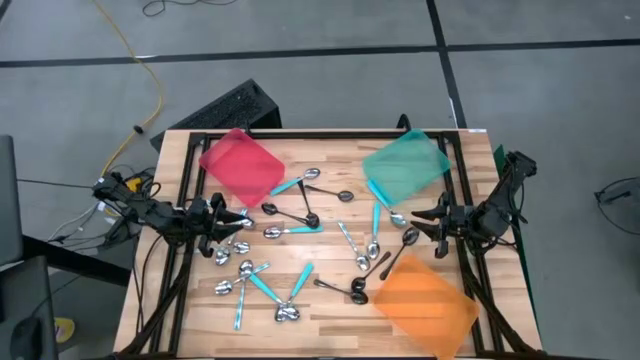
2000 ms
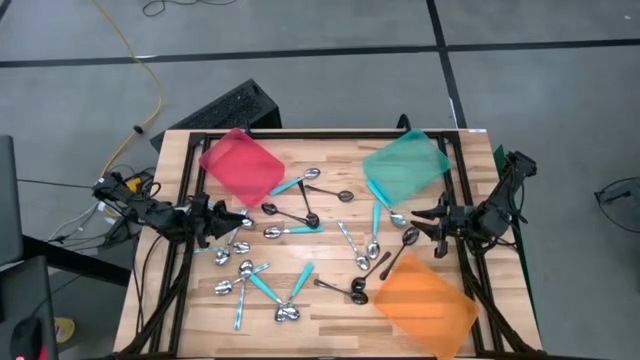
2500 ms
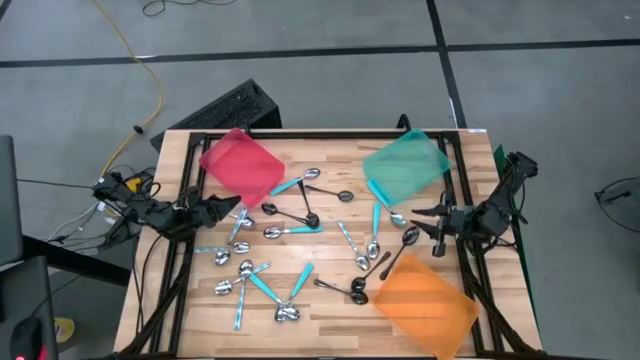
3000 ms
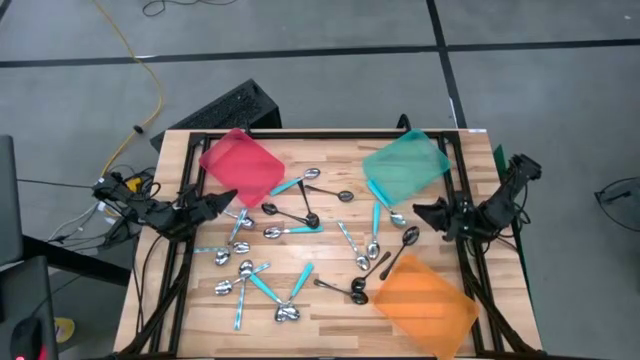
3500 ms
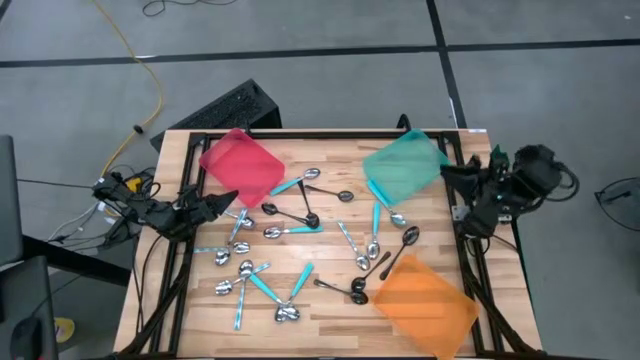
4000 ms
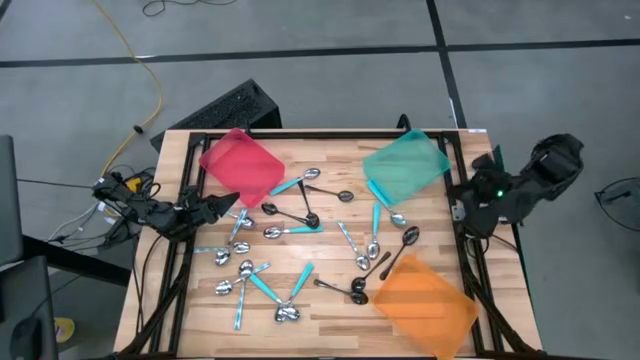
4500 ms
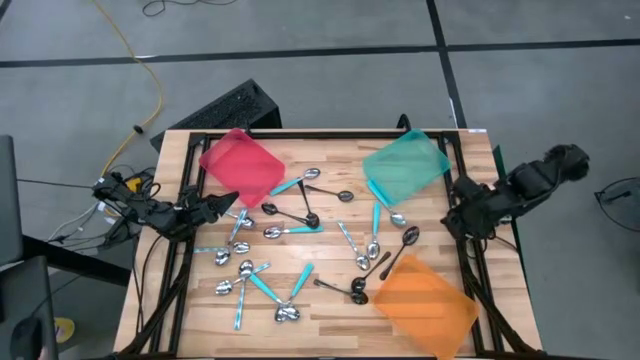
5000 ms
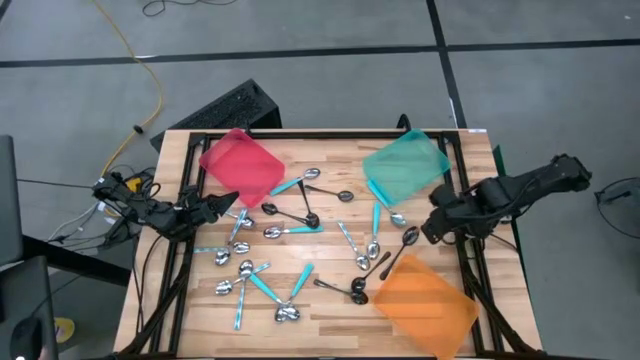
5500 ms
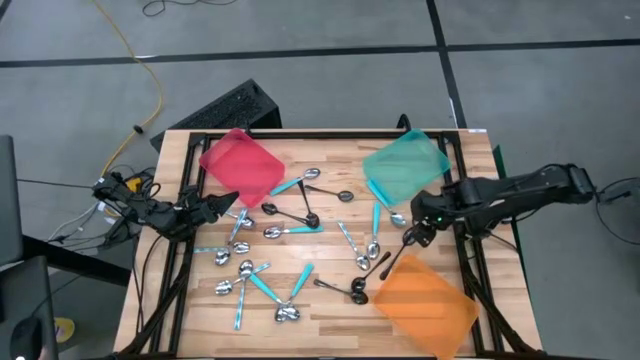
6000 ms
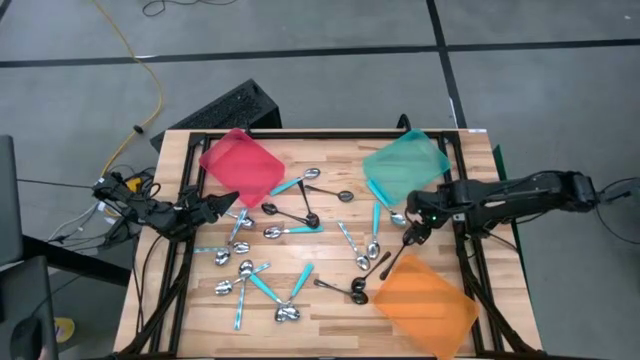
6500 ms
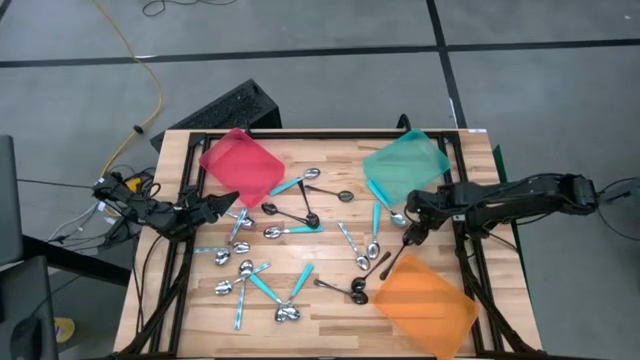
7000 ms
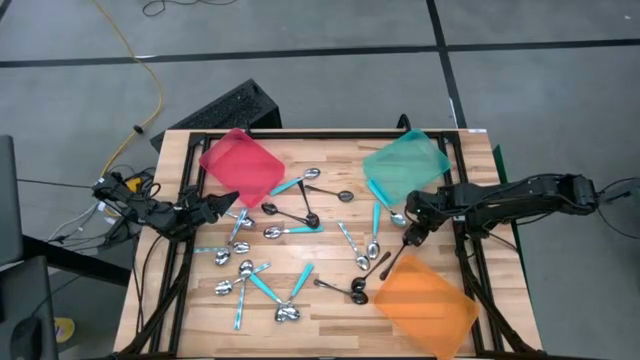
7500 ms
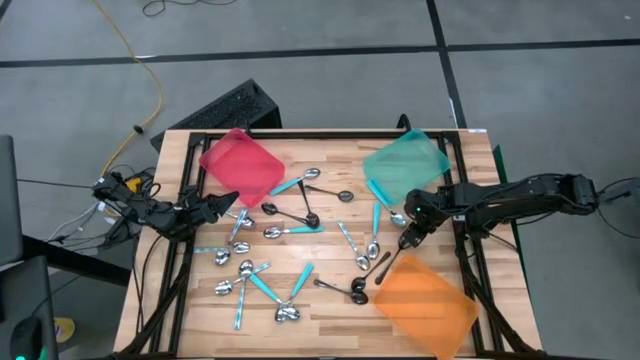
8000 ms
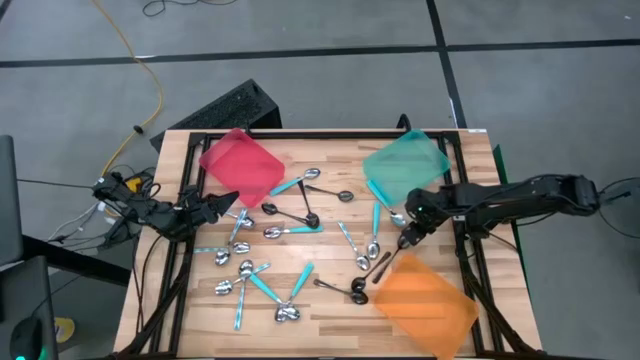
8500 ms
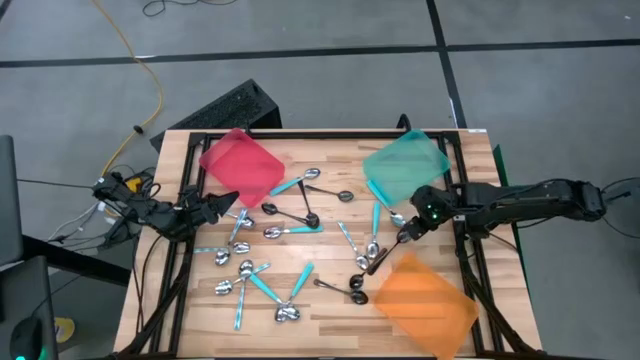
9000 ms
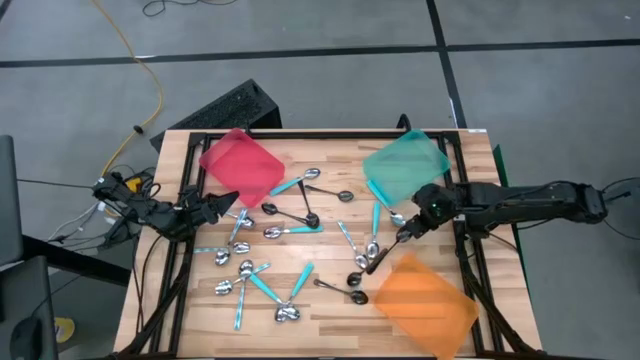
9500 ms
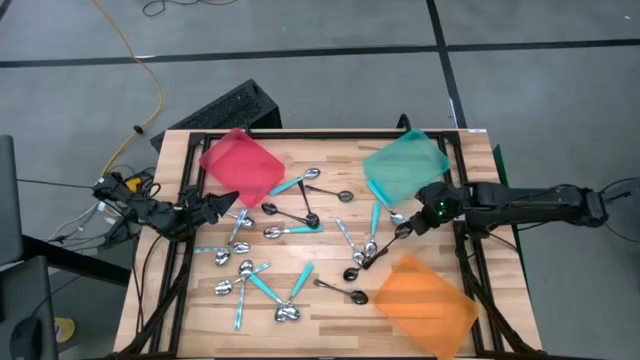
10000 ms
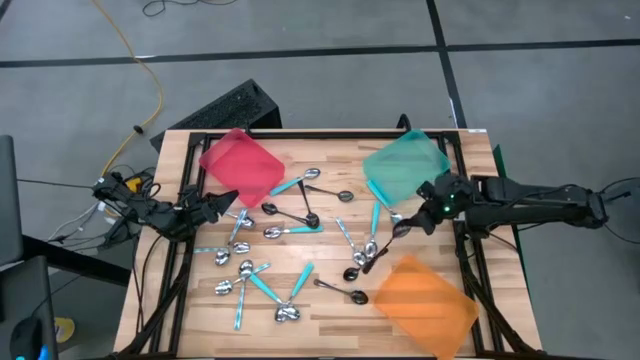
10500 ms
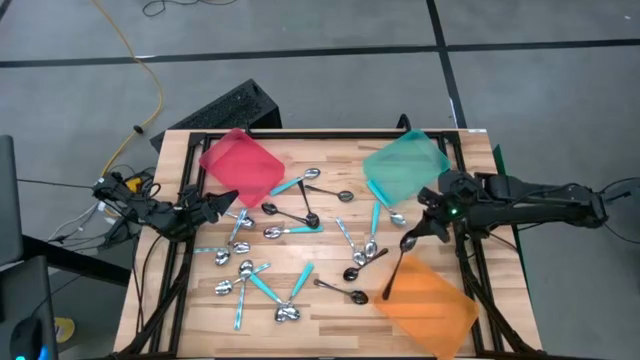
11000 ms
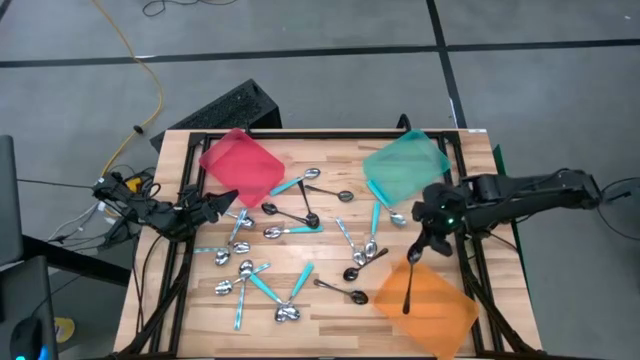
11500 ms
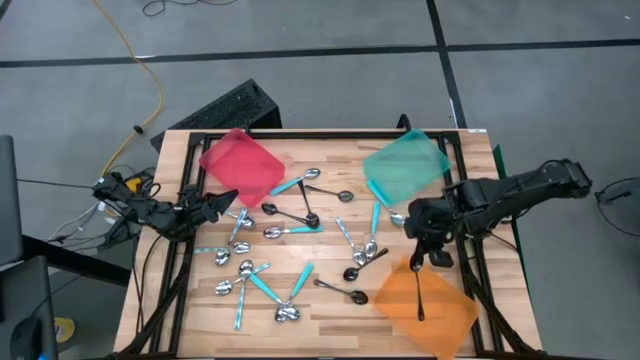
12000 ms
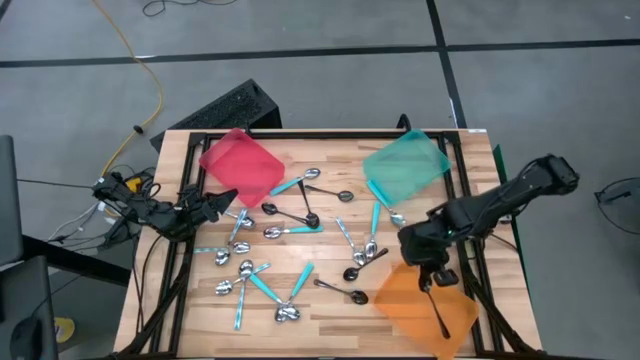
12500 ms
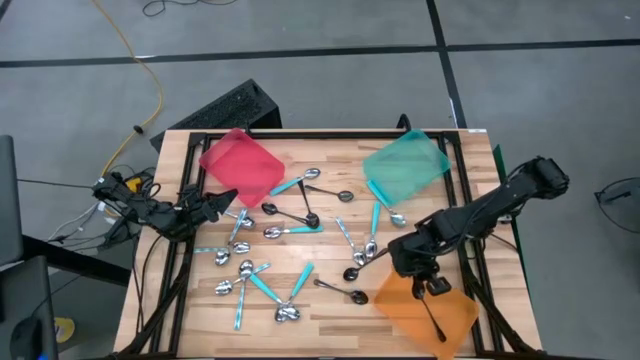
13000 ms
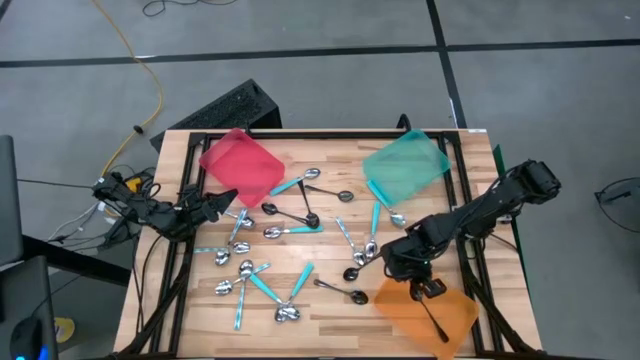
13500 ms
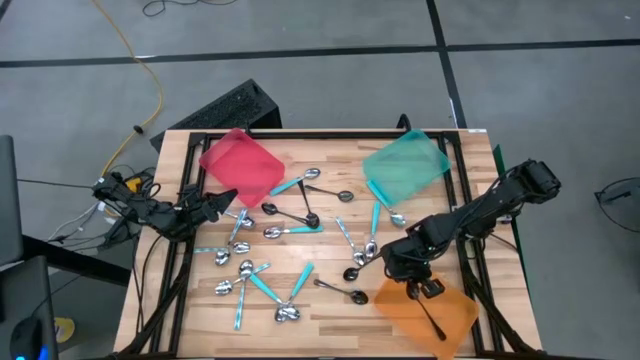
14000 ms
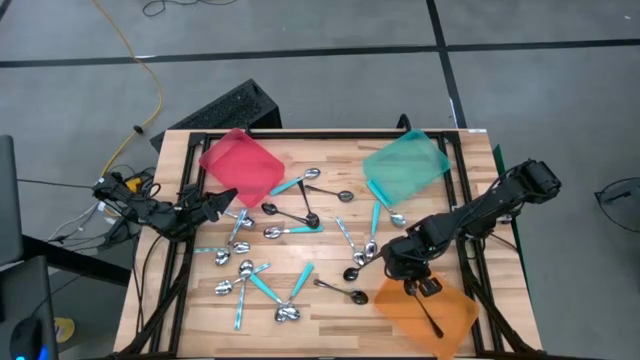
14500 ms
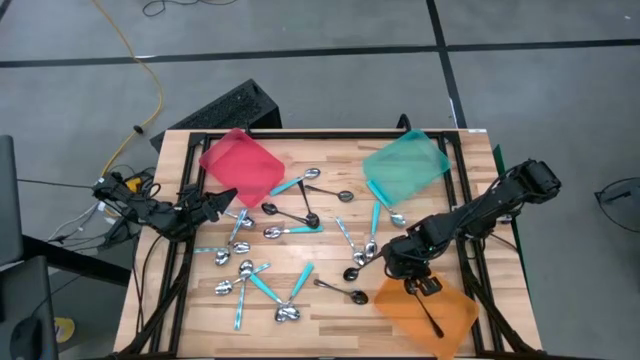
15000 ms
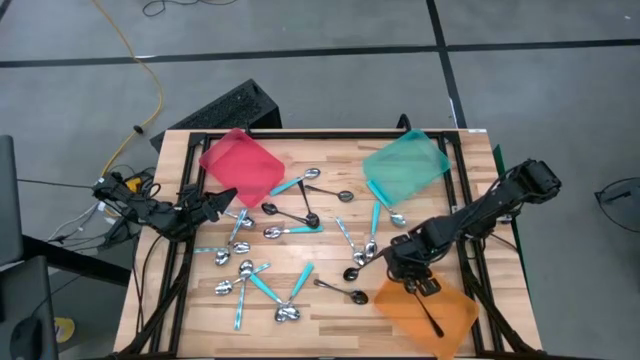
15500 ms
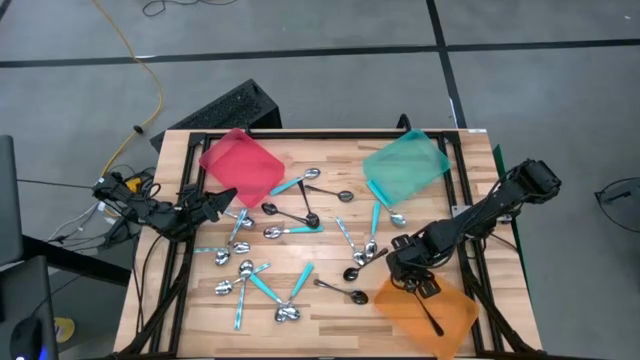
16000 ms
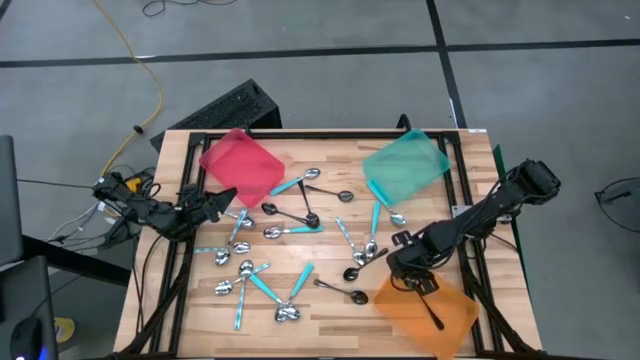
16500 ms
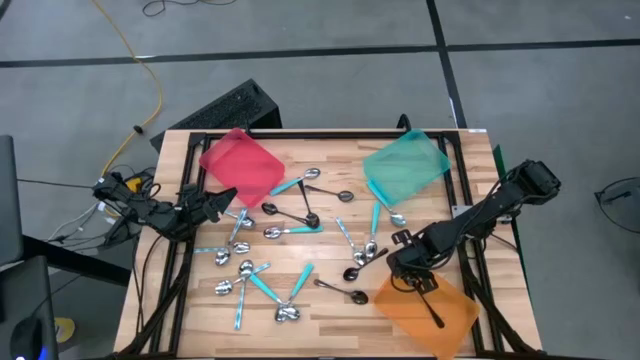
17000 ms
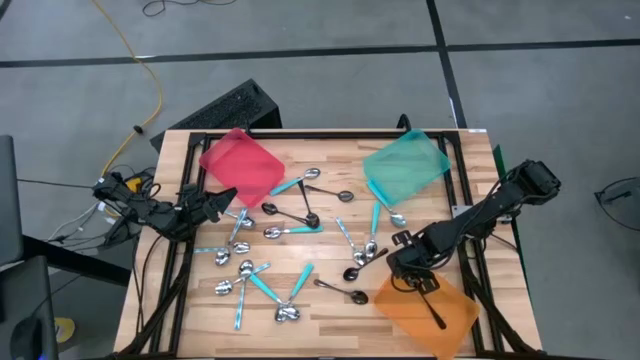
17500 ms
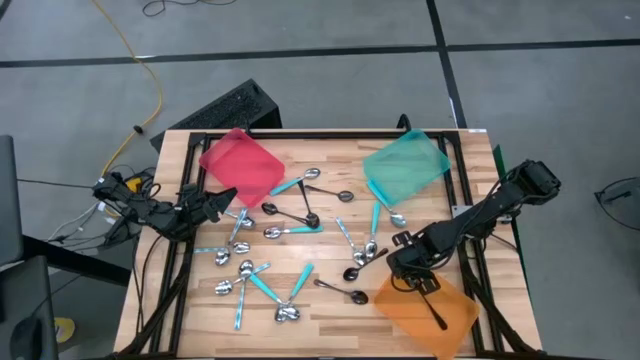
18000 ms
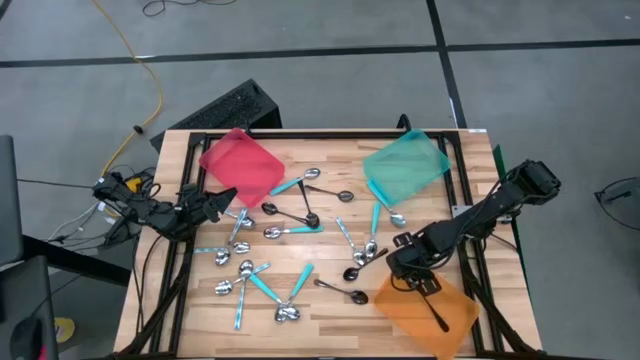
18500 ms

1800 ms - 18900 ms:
Task: Sort silverware by color (type)
Put the black spoon into the orange bin
